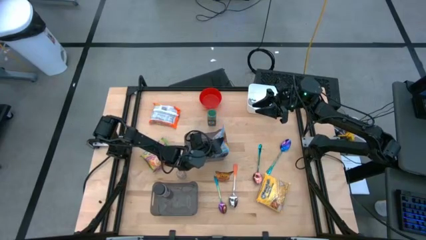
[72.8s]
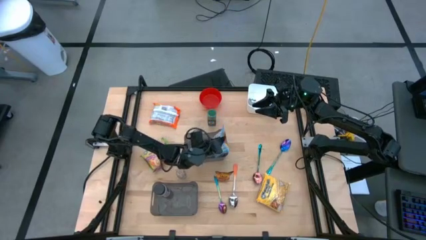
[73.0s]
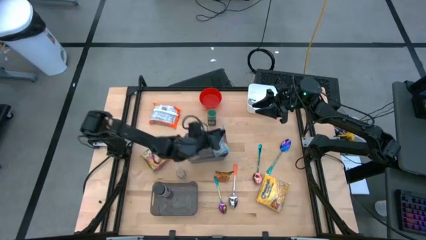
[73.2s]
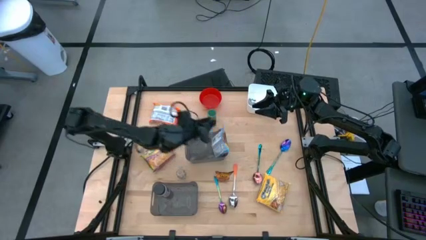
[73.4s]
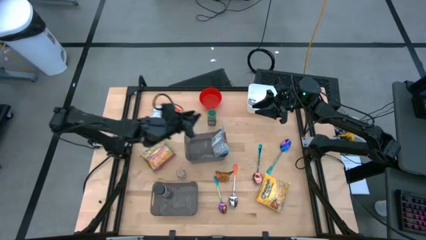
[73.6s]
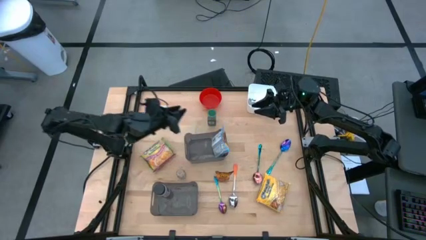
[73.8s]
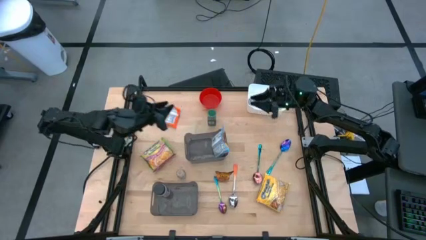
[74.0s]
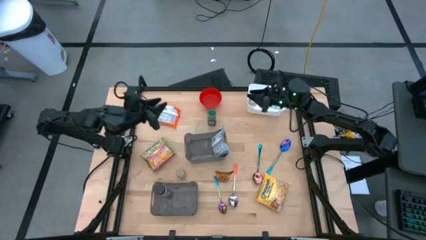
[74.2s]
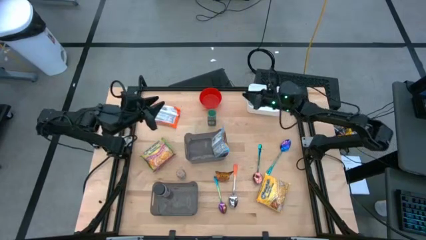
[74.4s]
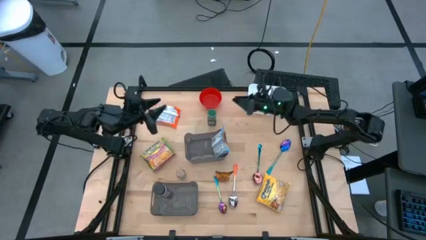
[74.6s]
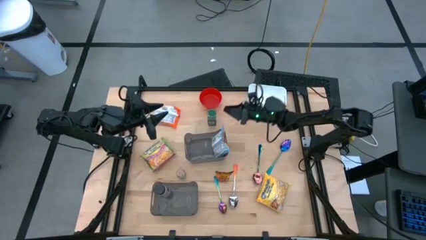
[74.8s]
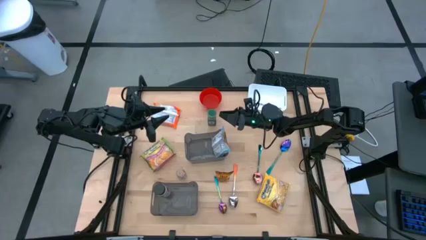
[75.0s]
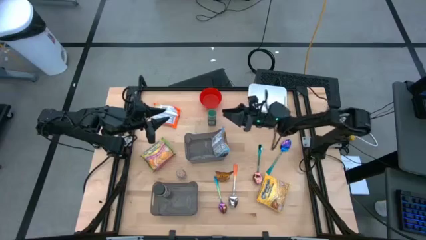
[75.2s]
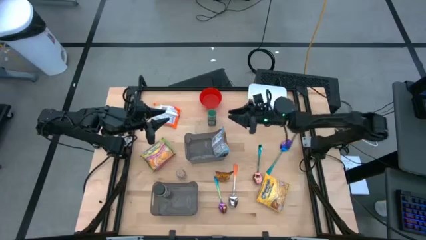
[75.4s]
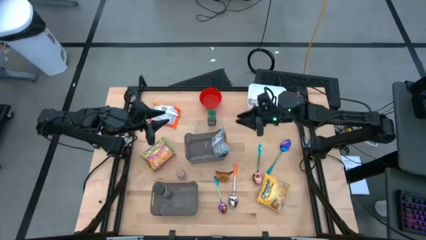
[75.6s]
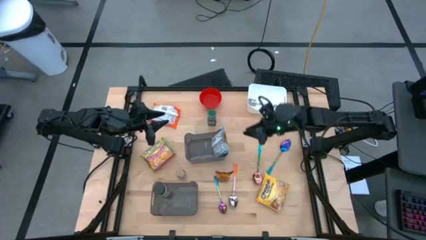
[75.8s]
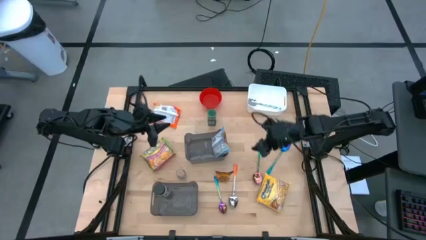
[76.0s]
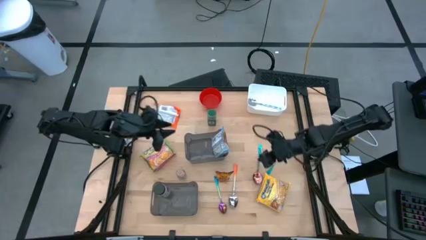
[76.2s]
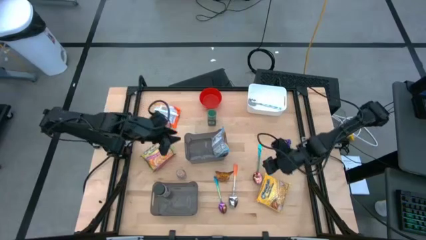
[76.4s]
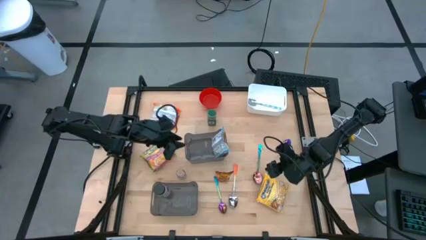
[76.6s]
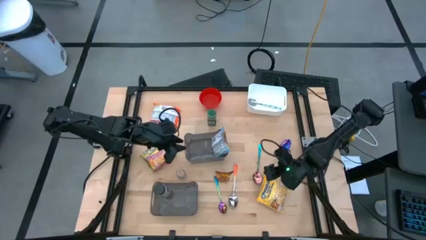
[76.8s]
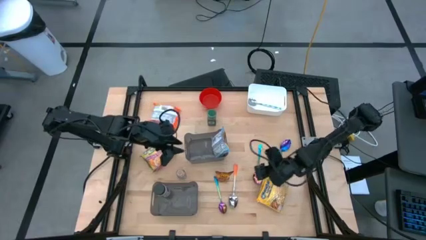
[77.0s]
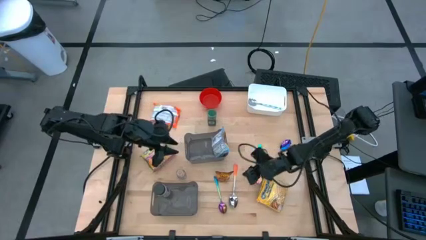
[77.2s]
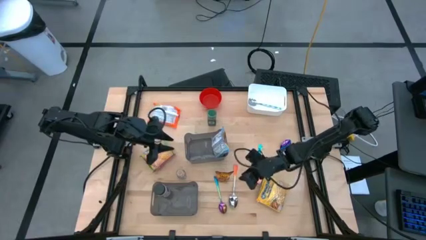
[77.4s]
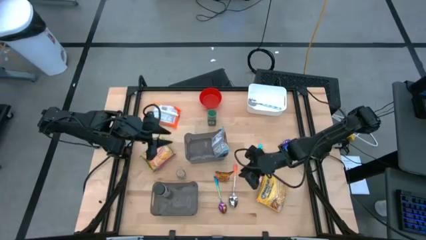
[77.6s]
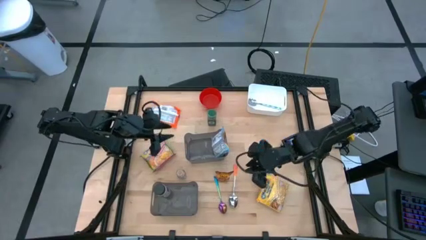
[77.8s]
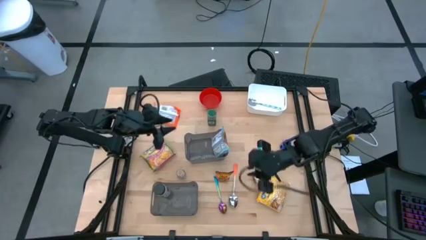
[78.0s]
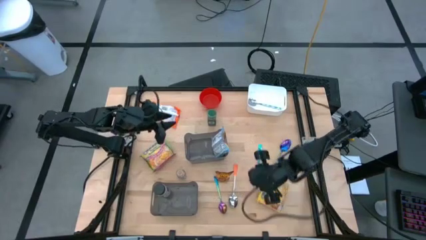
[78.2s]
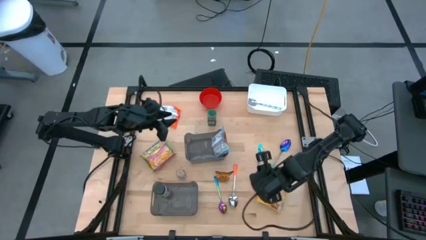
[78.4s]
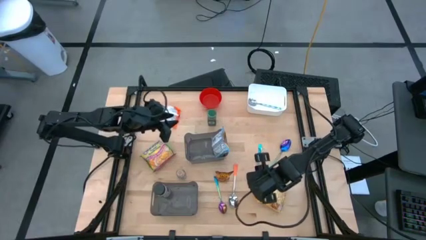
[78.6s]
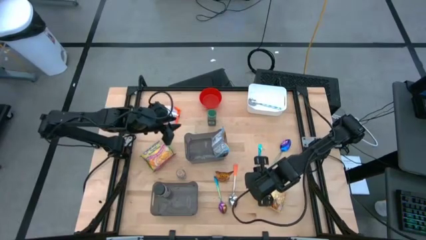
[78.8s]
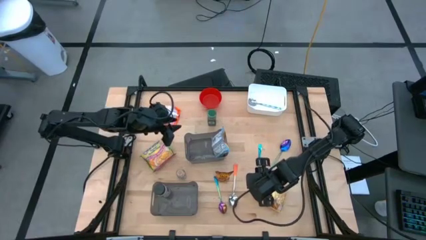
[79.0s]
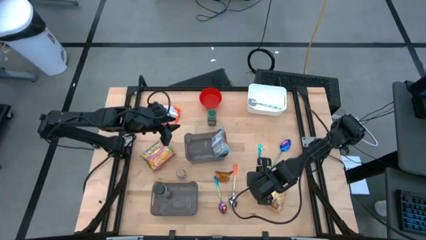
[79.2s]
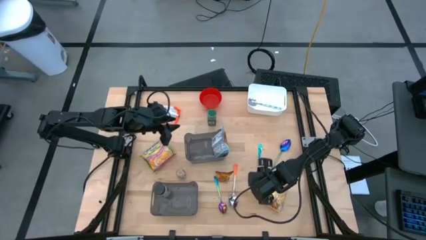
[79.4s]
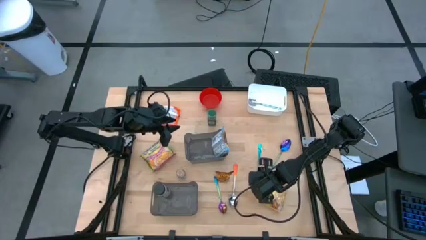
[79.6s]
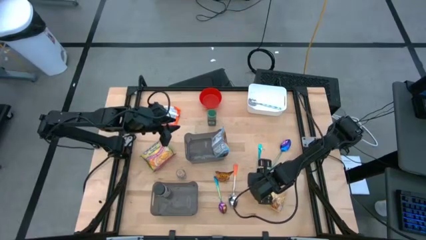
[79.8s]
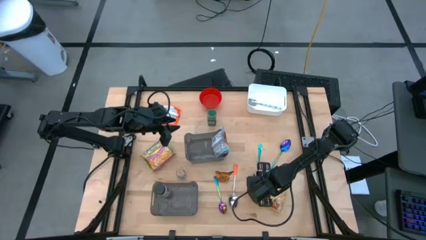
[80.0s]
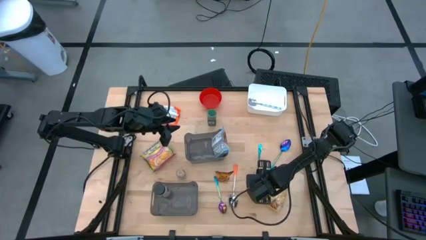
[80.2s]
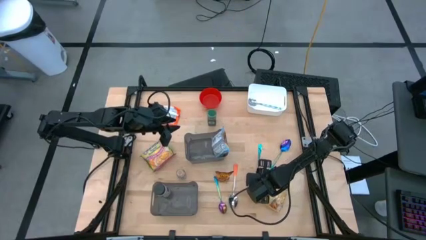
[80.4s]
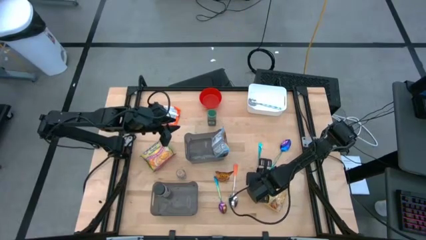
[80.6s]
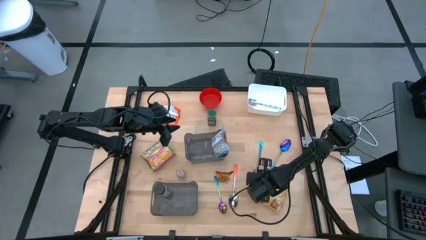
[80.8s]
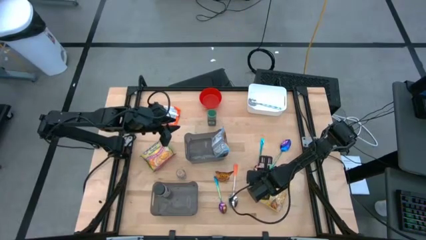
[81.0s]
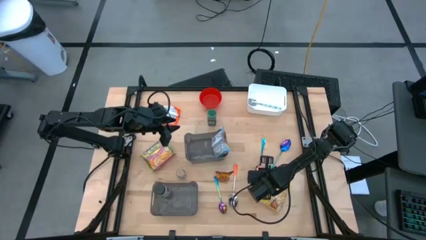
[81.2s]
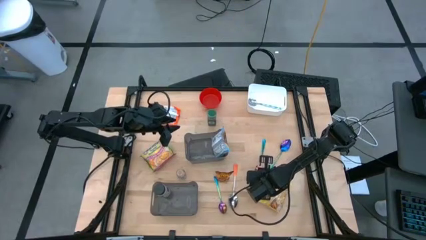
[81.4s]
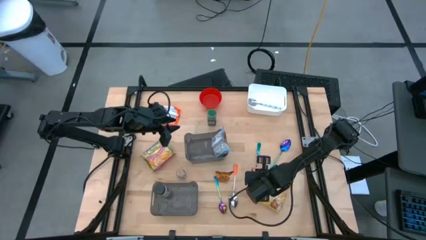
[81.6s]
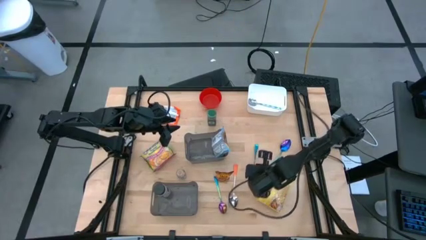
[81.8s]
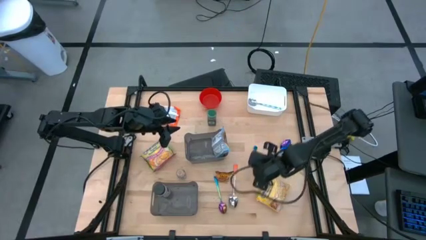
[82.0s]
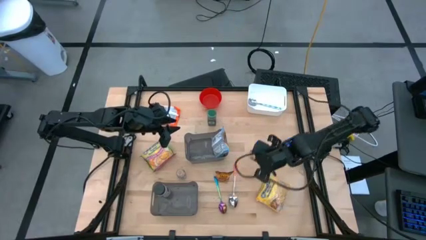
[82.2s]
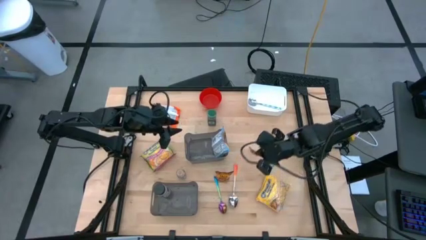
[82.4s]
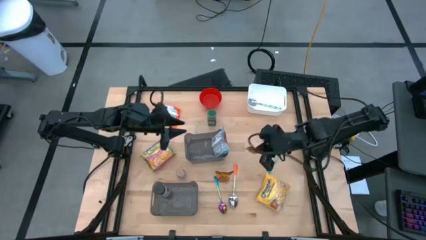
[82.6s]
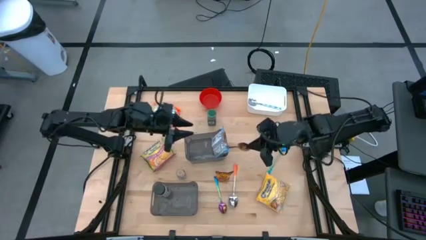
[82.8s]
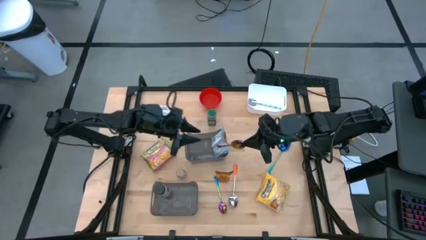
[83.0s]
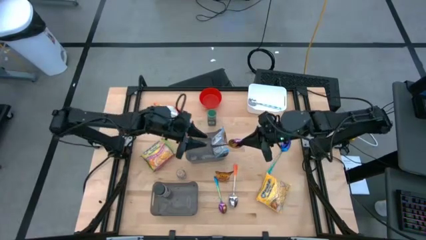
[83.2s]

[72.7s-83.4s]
Task: Pick & Place Food Item
Put the top left purple spoon into the white bin

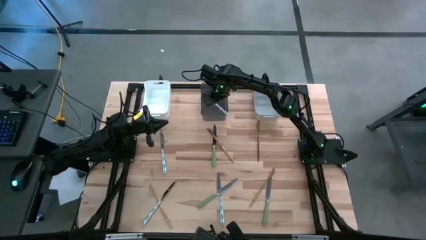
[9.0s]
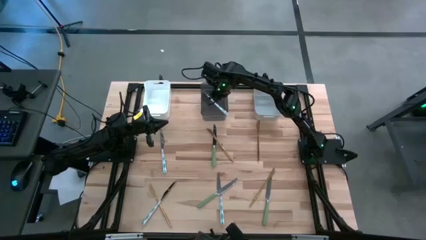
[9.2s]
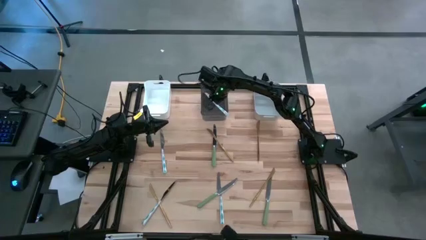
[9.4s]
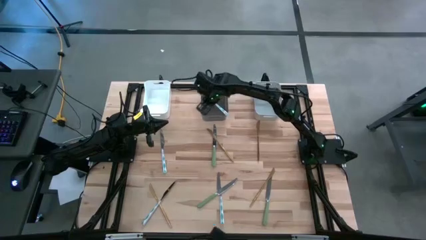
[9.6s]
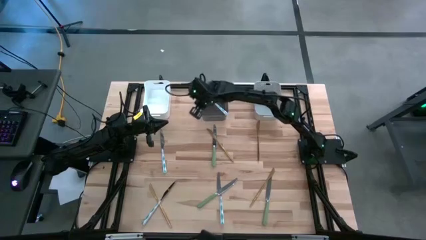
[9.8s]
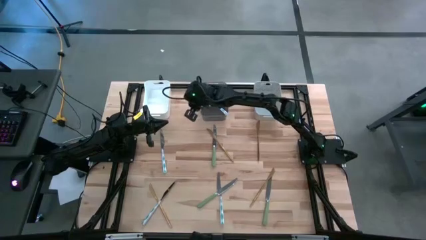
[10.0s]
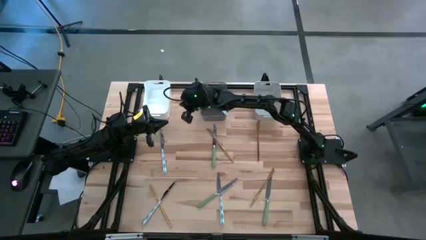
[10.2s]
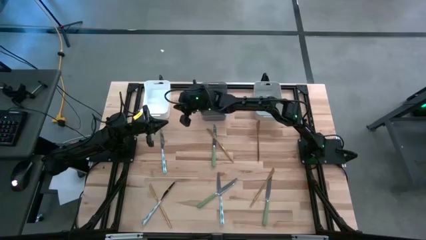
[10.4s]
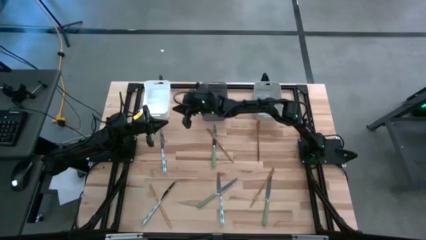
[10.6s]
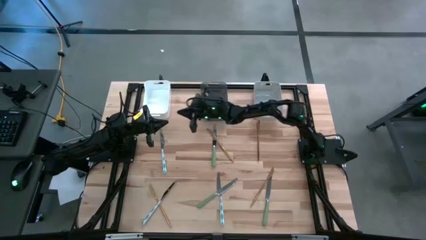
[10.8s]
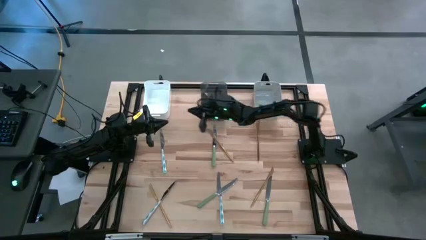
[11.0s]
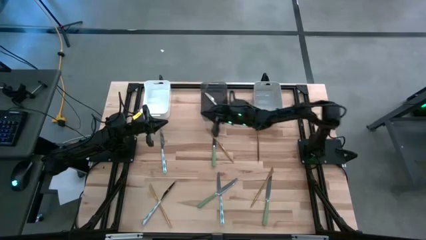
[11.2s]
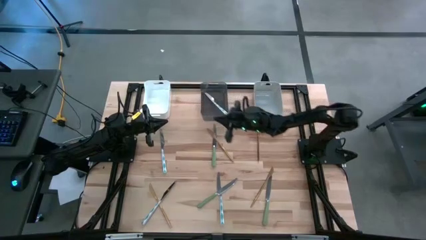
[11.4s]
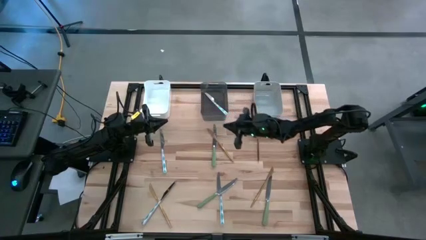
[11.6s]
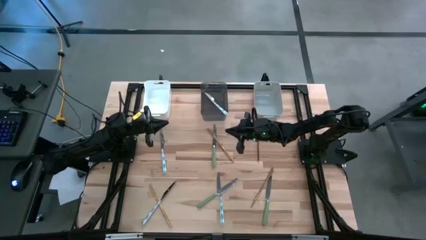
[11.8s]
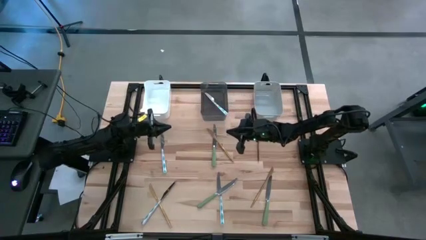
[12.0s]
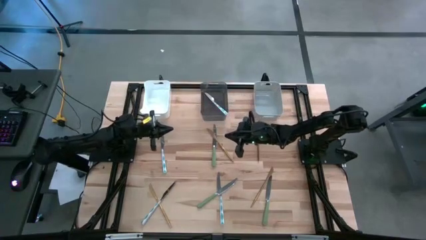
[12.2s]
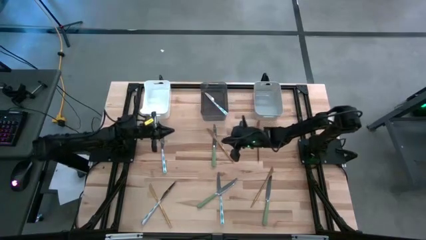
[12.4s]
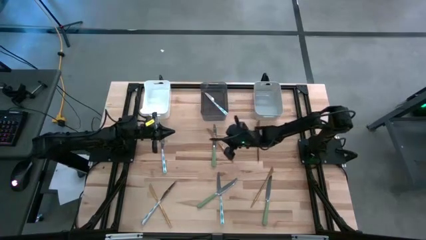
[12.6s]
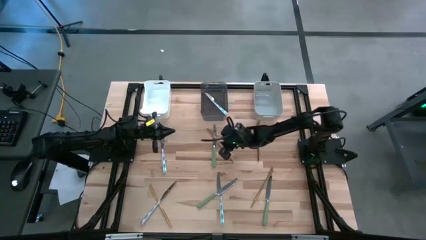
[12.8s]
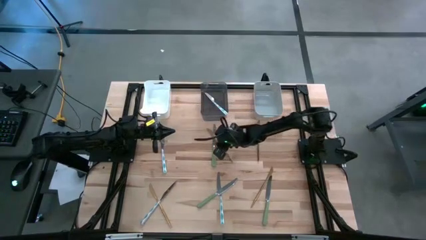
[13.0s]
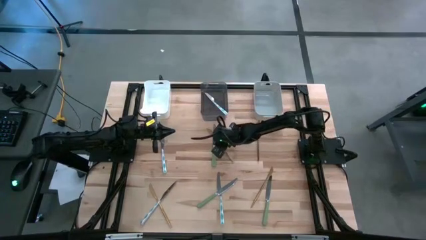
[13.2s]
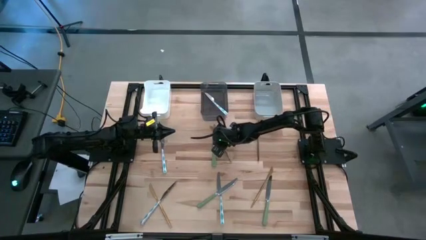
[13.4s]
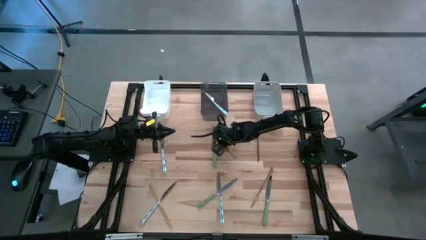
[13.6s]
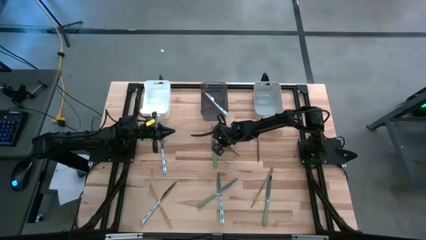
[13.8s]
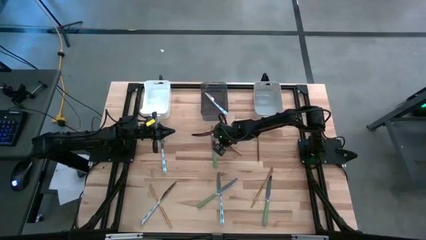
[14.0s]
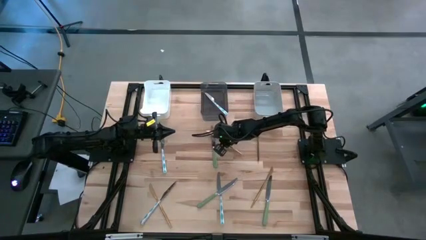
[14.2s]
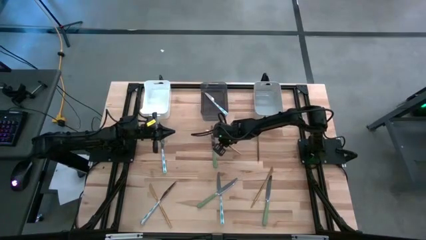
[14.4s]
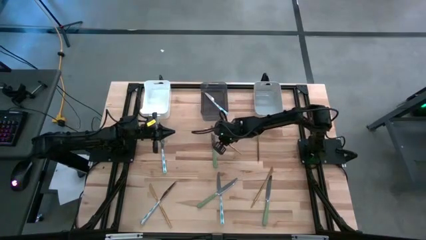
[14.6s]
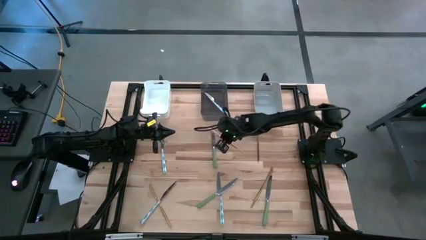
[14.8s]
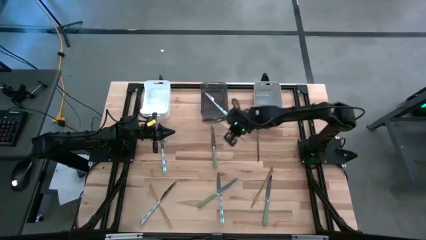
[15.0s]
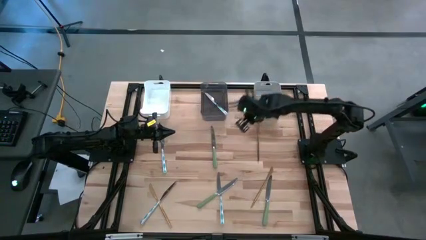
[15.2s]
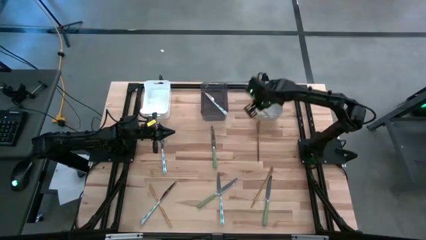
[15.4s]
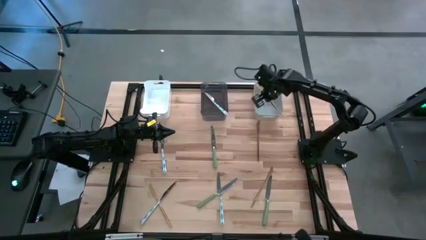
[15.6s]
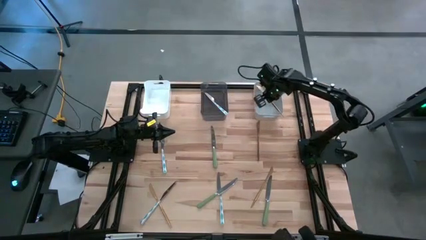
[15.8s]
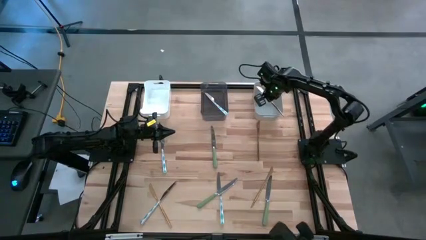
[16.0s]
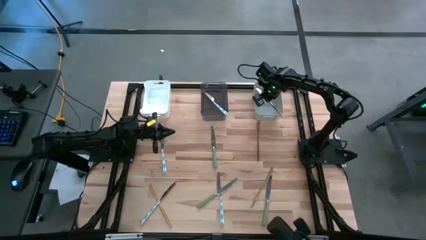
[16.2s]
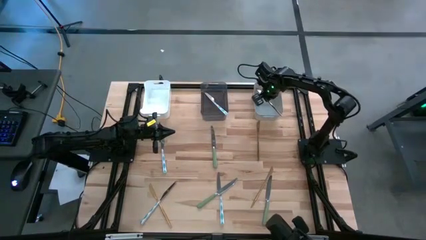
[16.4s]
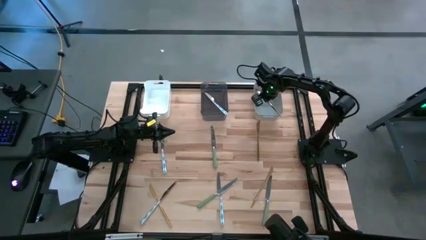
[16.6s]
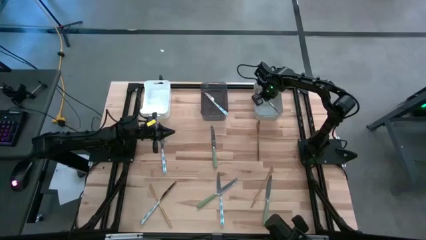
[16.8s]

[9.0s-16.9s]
Task: Sort silverware by color (type)
Put the top center yellow table knife into the gray bin
